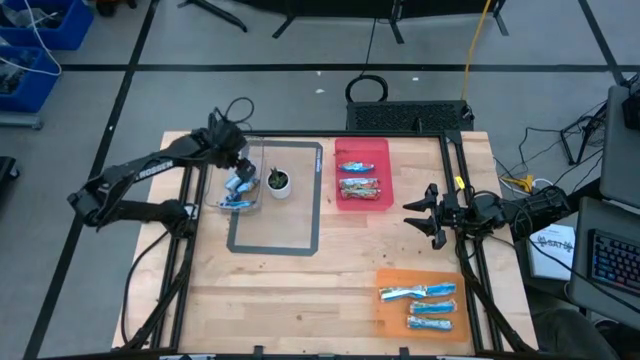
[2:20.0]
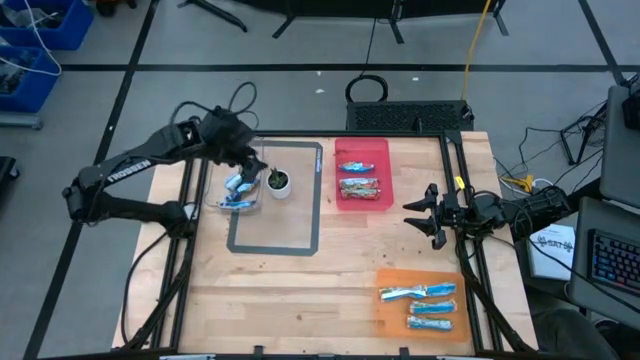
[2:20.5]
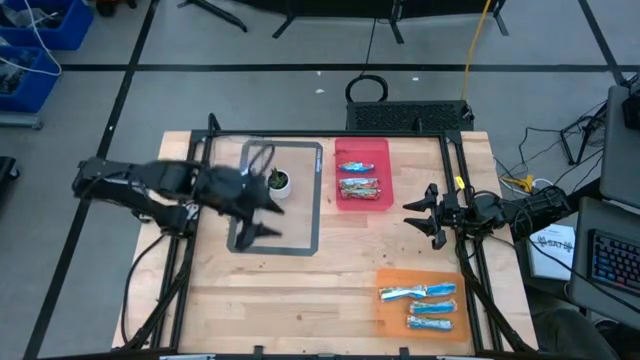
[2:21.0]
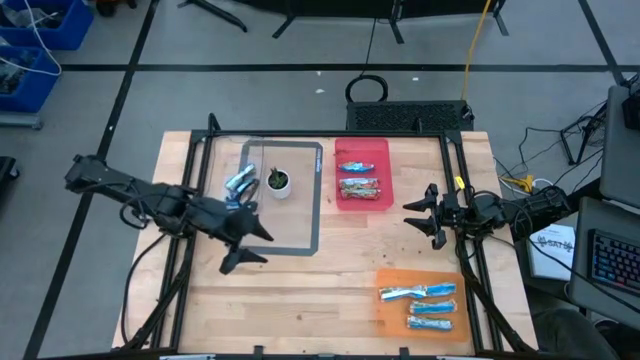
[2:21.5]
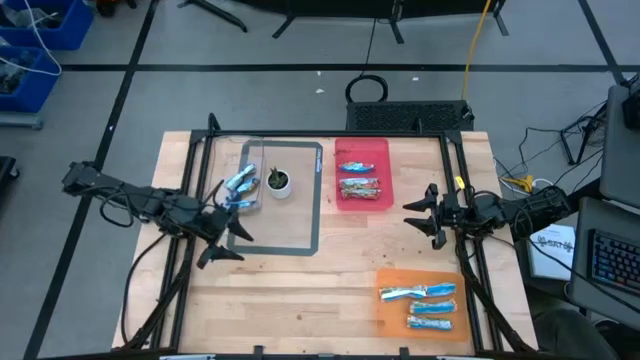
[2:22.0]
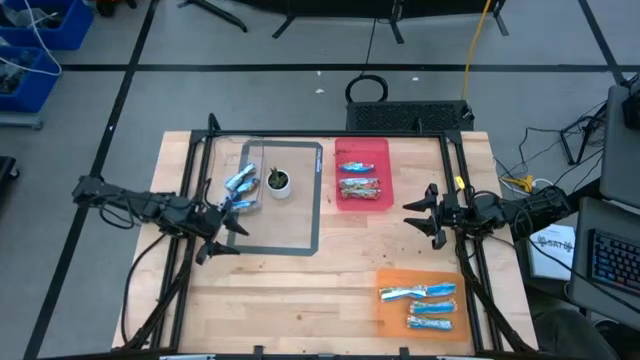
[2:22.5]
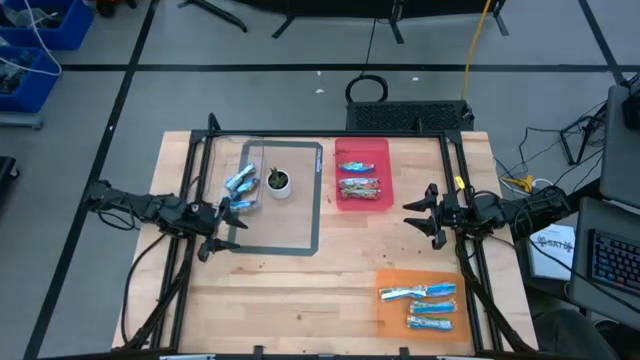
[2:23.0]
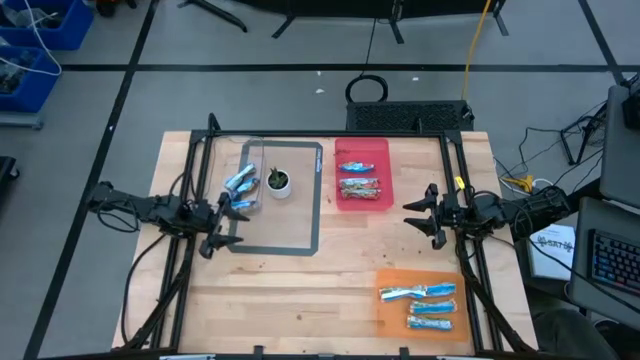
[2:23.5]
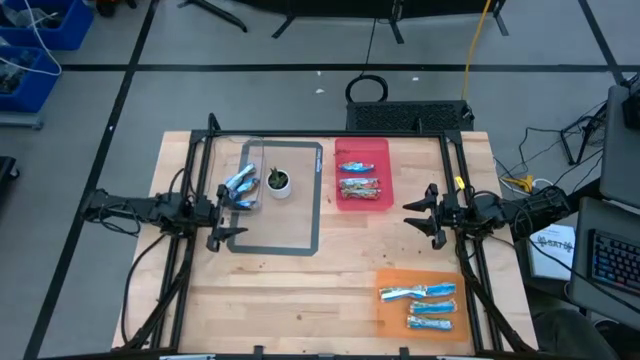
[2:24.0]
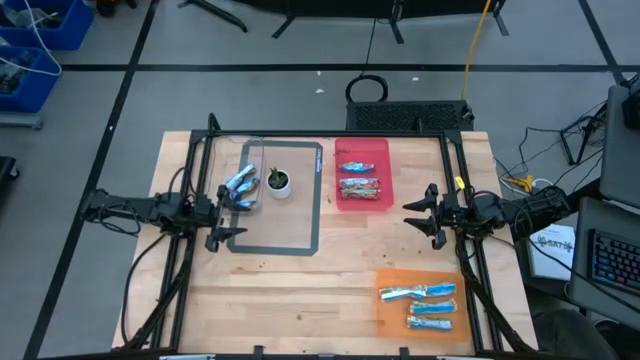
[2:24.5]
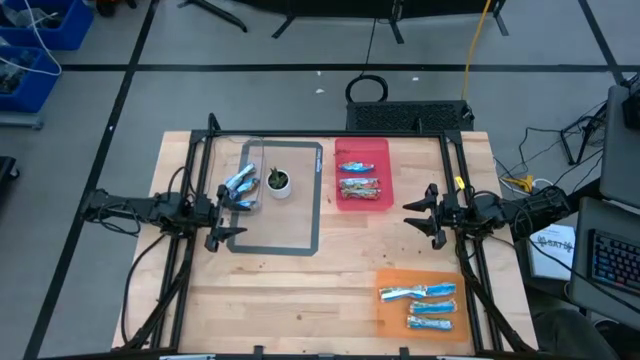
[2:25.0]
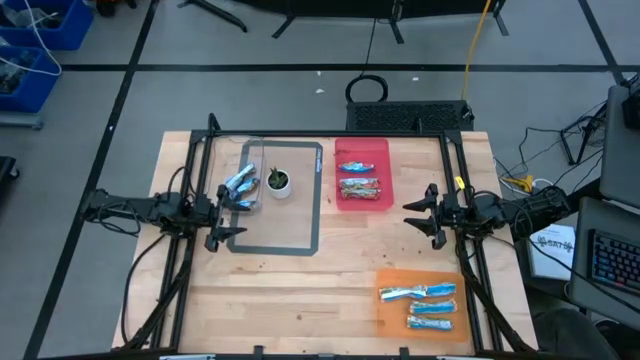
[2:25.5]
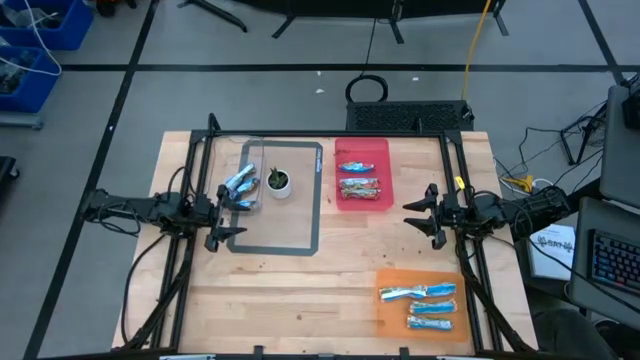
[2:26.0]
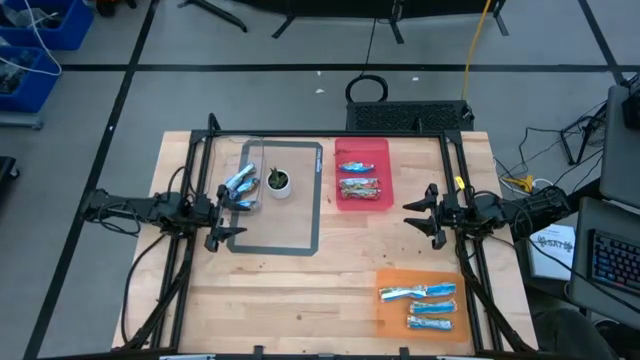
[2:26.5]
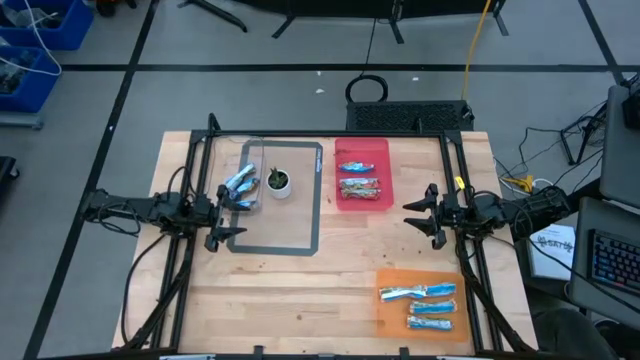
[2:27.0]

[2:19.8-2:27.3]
Task: Pick and place Granola Bars by type
Return to Home Position

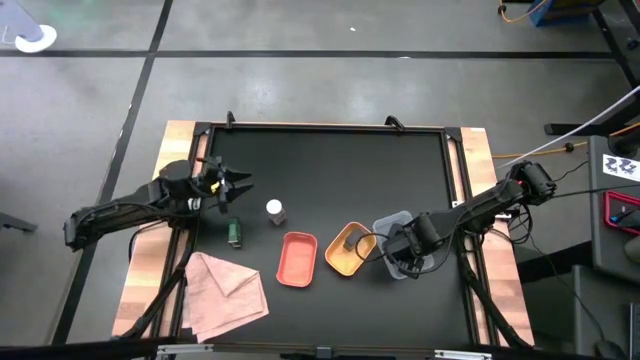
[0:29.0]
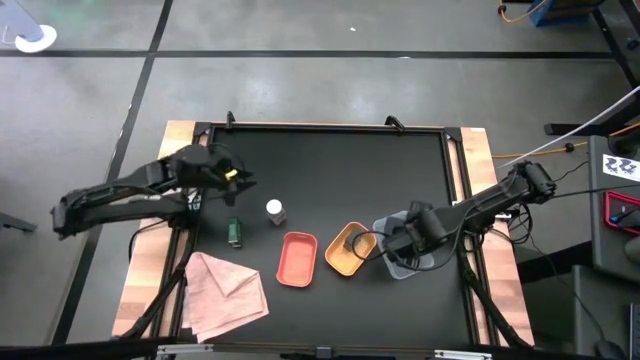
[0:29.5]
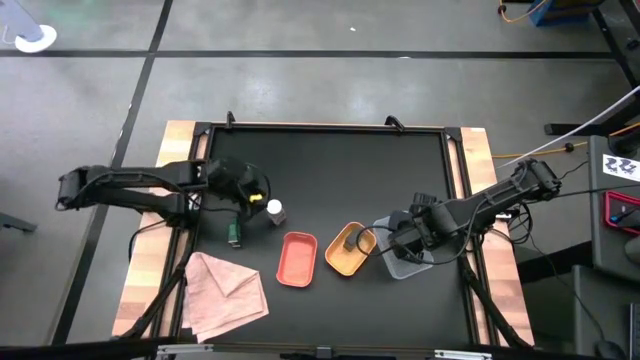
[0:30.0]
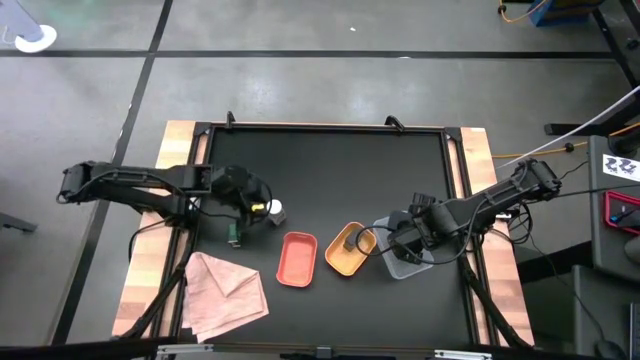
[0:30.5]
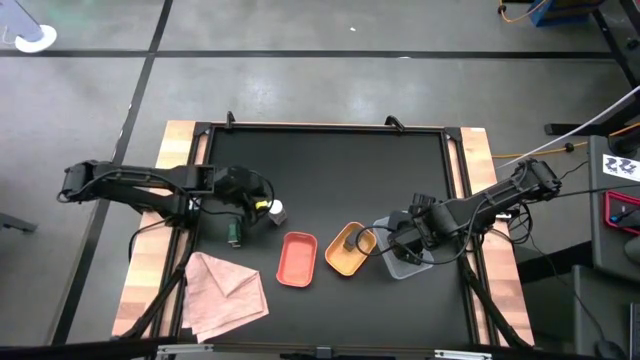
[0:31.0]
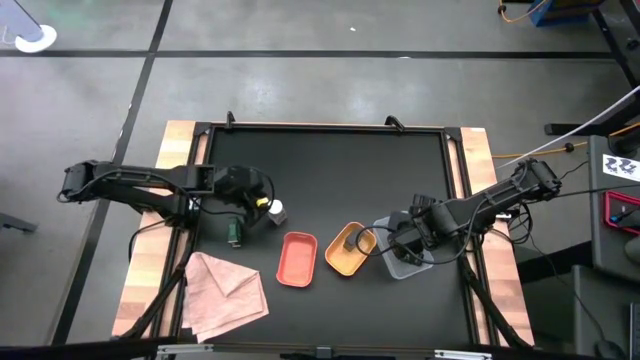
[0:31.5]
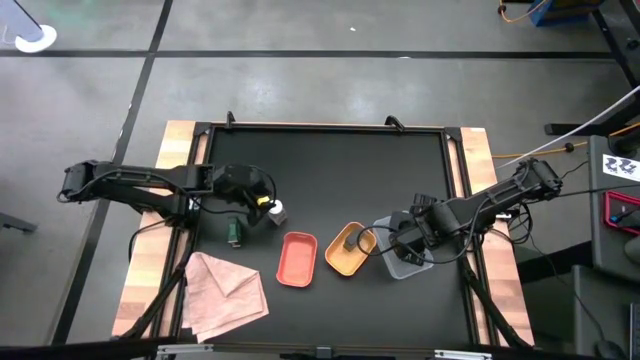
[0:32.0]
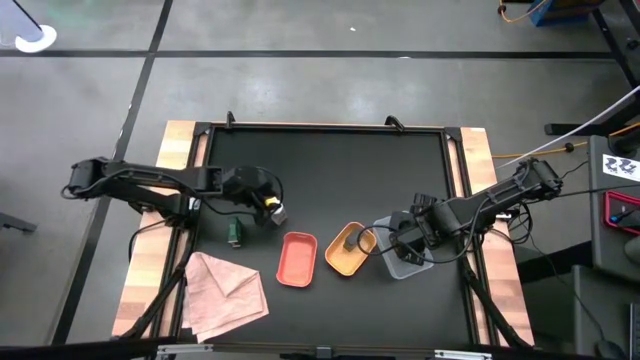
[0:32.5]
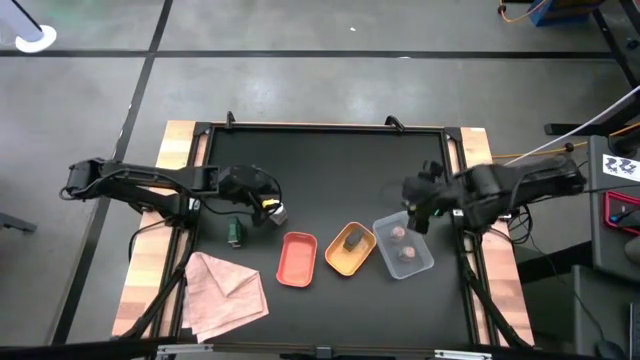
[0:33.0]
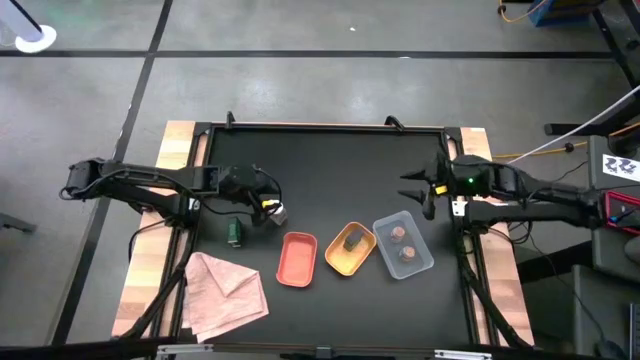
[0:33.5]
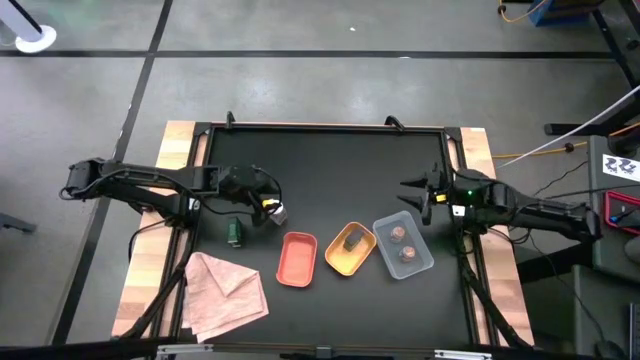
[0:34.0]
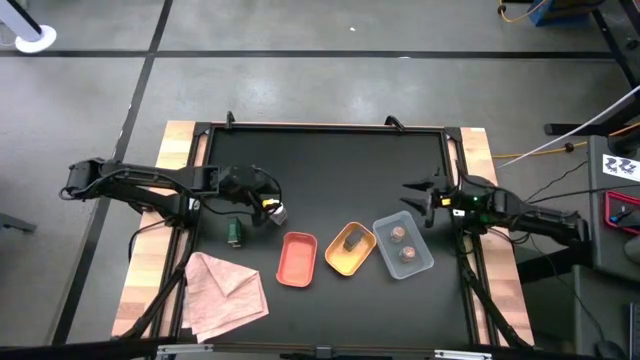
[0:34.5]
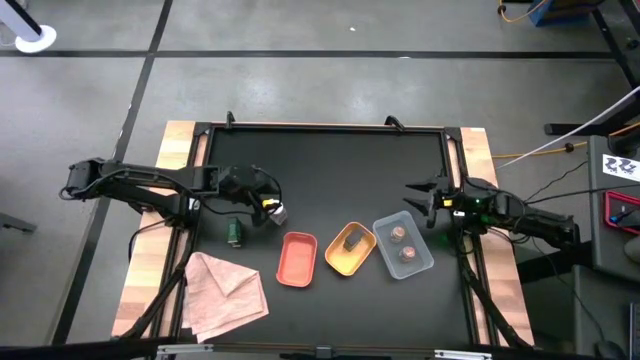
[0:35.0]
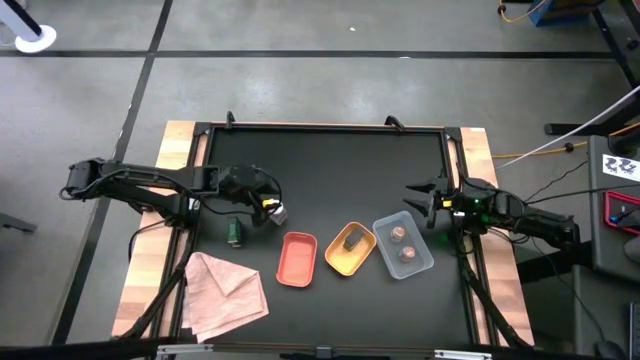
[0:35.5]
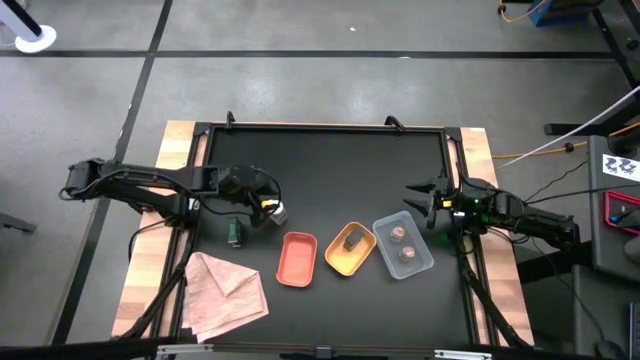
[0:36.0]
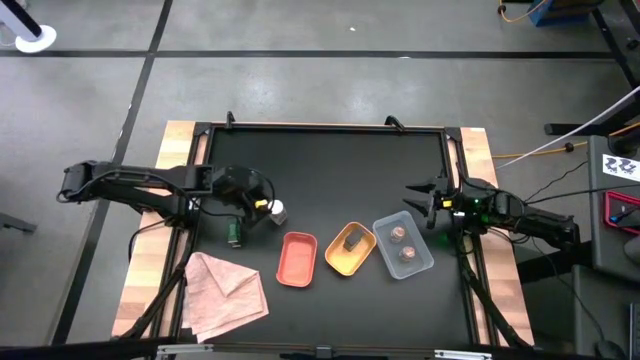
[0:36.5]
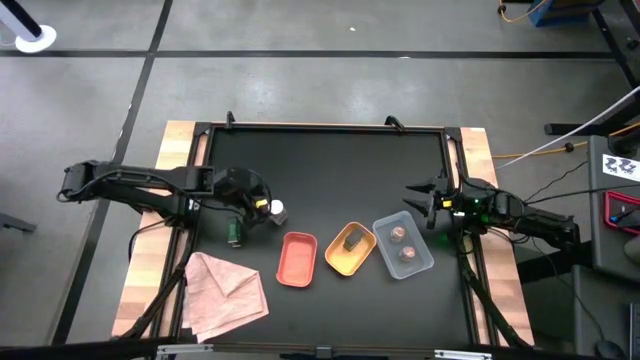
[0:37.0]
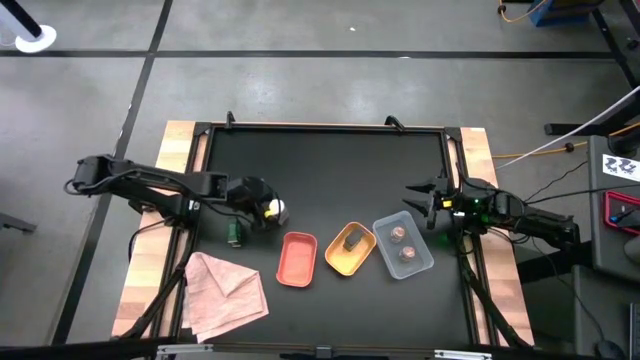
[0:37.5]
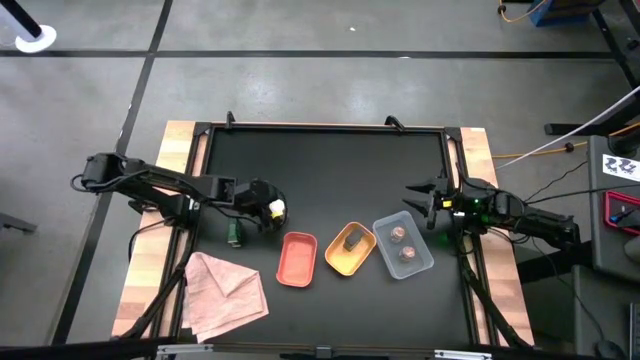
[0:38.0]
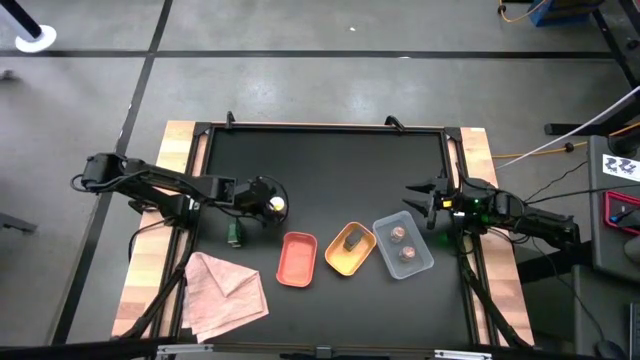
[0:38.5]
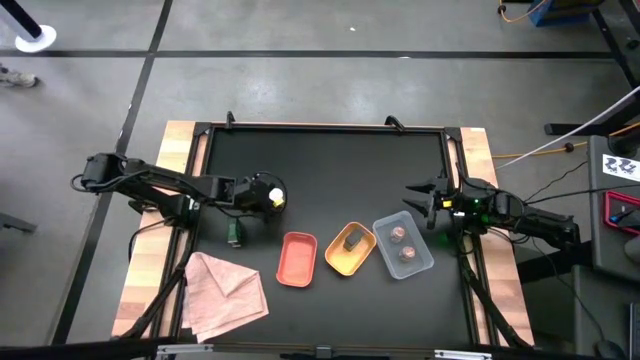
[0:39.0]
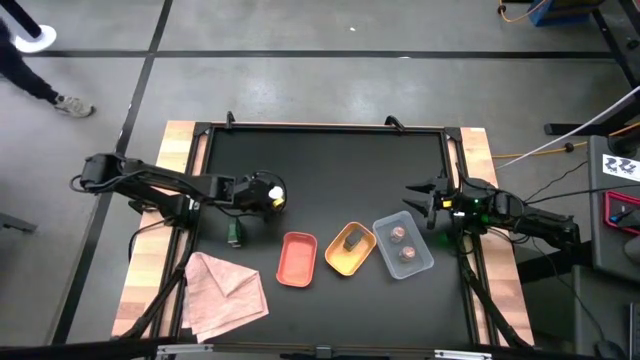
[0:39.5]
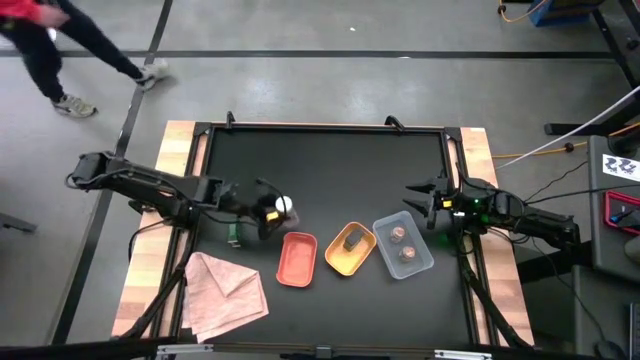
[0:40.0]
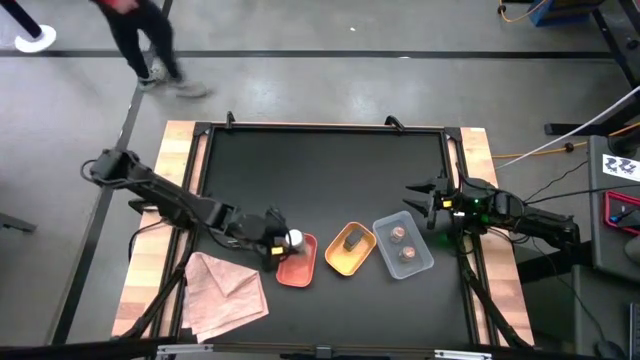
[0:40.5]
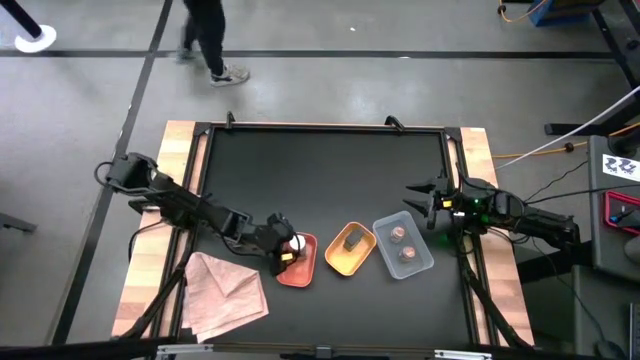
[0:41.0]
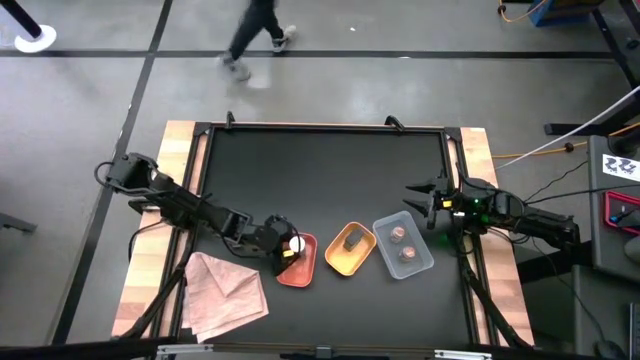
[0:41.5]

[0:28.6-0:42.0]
Task: Sort spices by type
Put the white spice bottle into the orange bin
